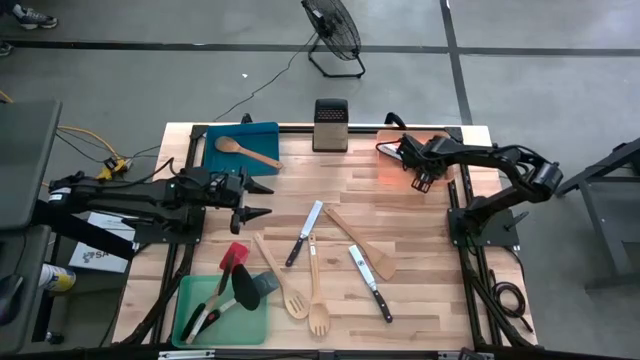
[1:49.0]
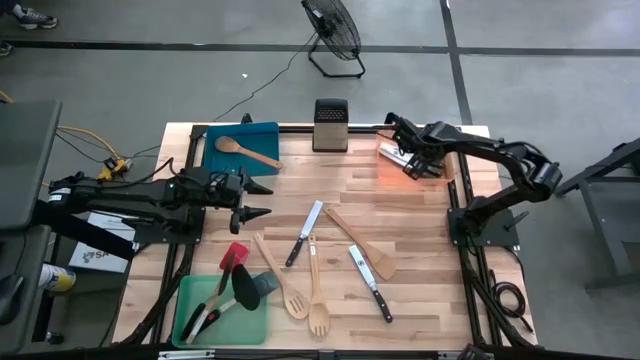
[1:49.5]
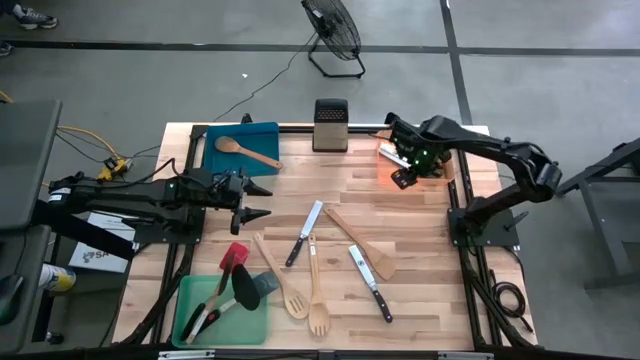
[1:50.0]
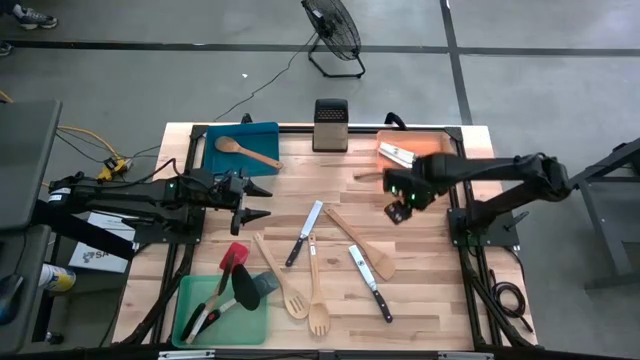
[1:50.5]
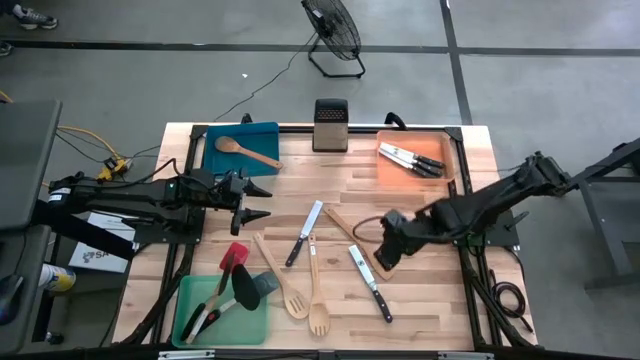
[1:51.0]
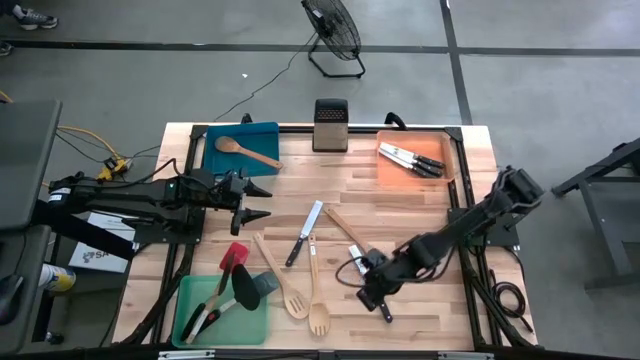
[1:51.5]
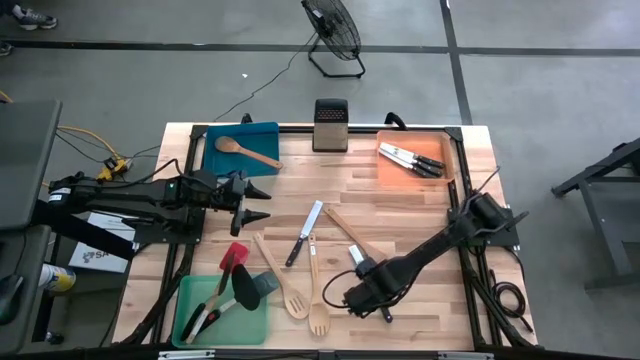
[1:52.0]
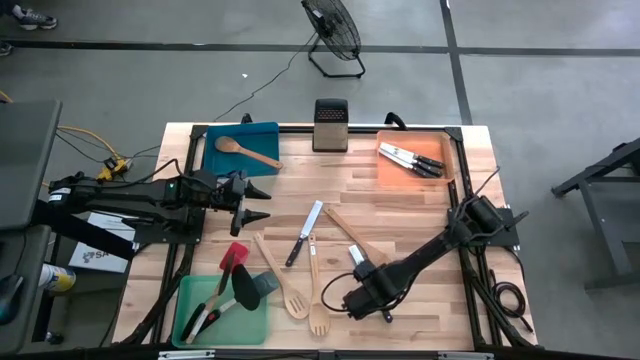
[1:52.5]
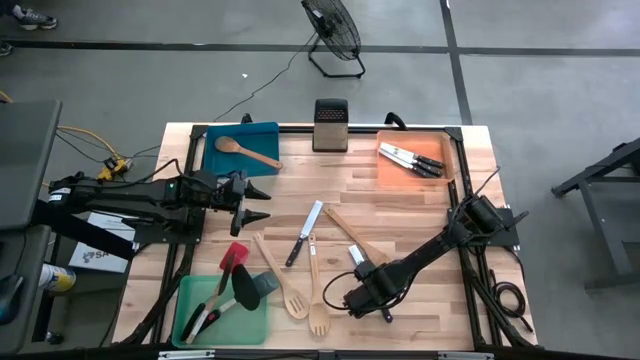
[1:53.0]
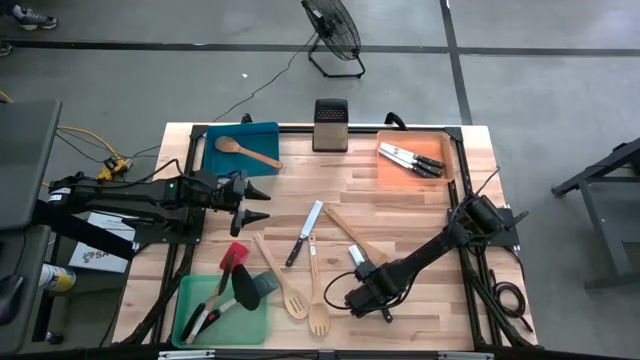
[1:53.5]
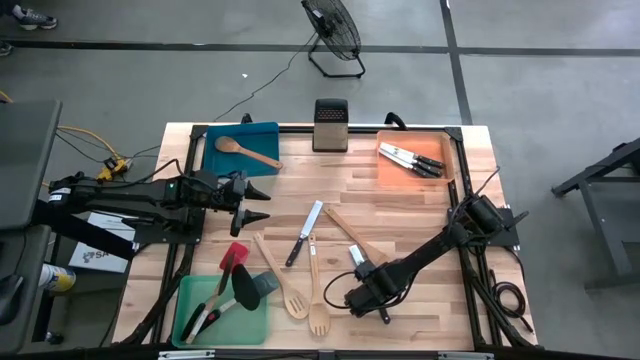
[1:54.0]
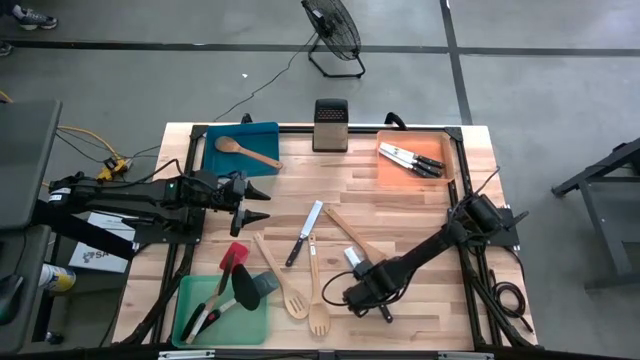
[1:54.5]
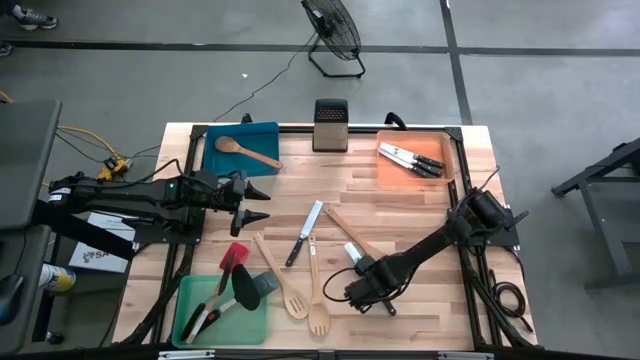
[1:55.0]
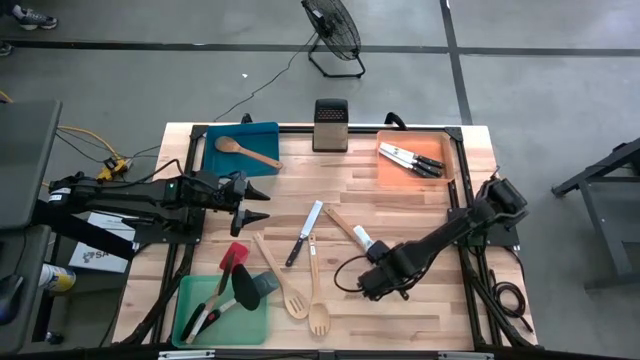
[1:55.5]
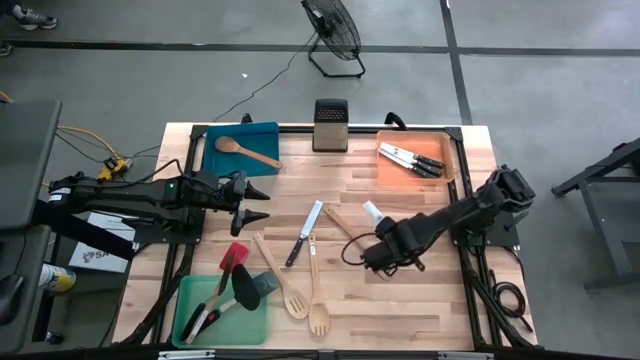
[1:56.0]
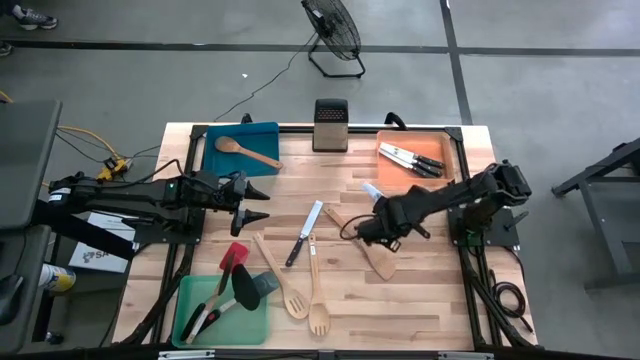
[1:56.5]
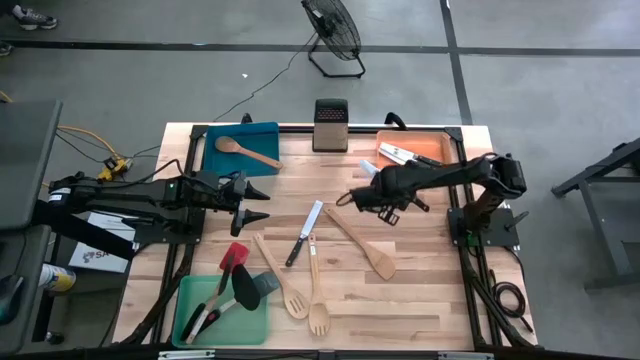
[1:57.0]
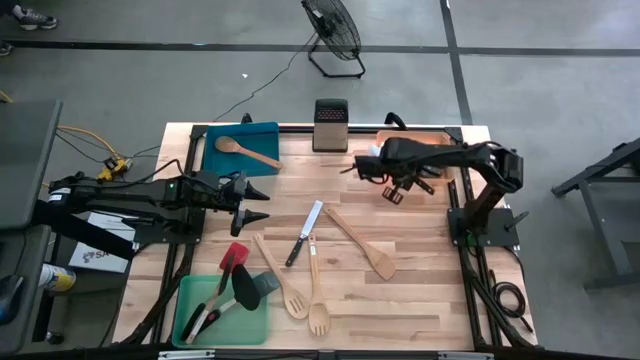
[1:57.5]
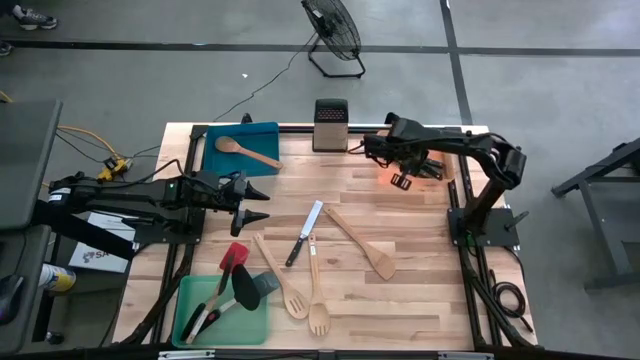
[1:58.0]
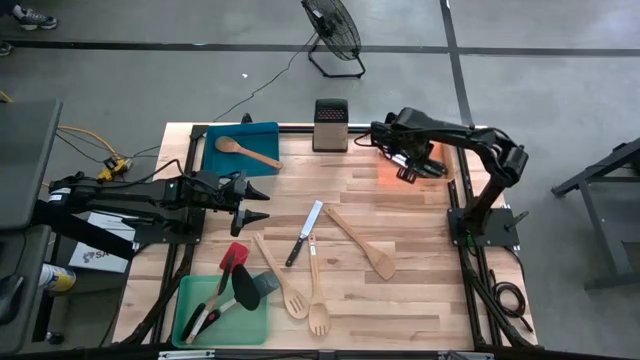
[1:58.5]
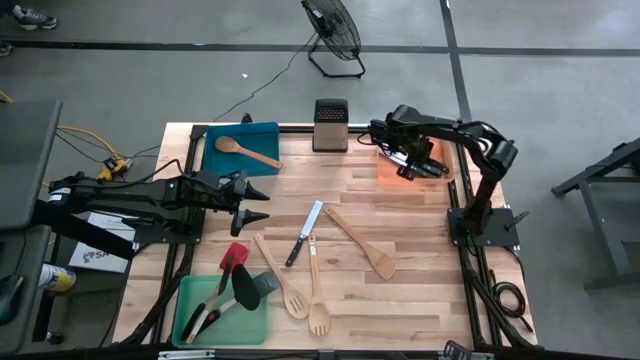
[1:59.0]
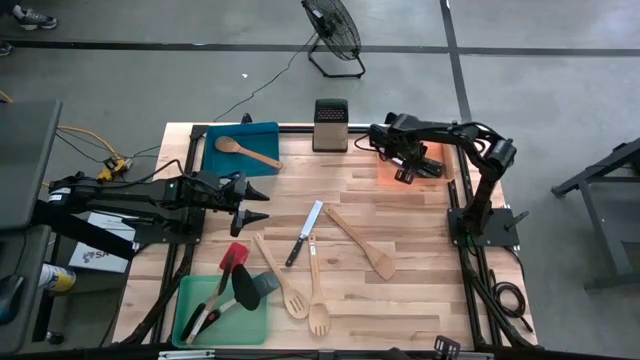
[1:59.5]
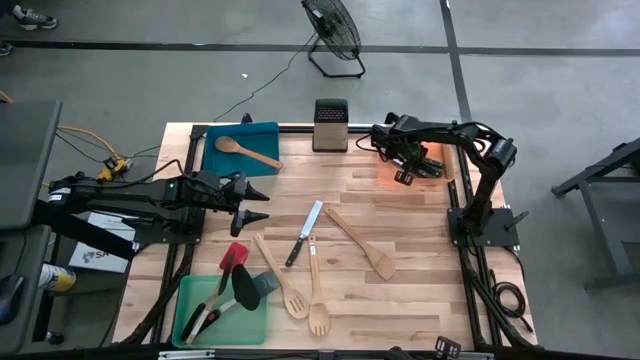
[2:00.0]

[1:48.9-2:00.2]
Task: Pick & Place Kitchen Items
Put the black spatula into the orange bin

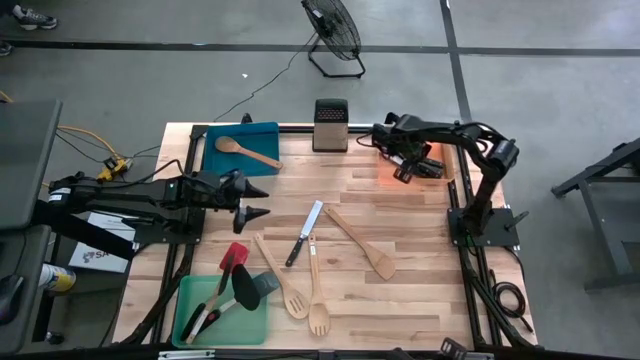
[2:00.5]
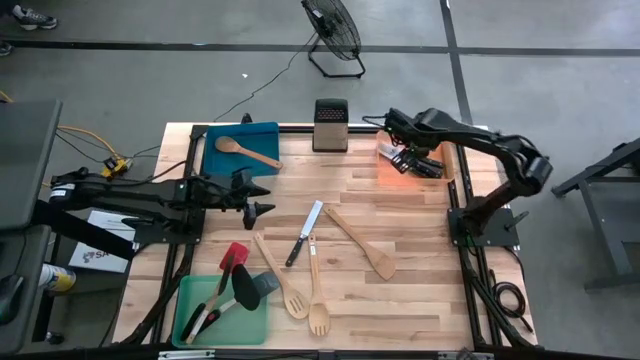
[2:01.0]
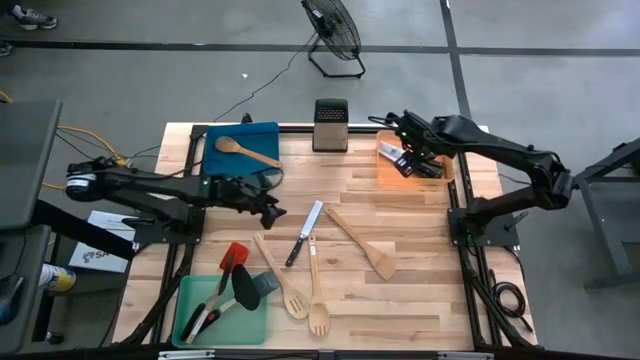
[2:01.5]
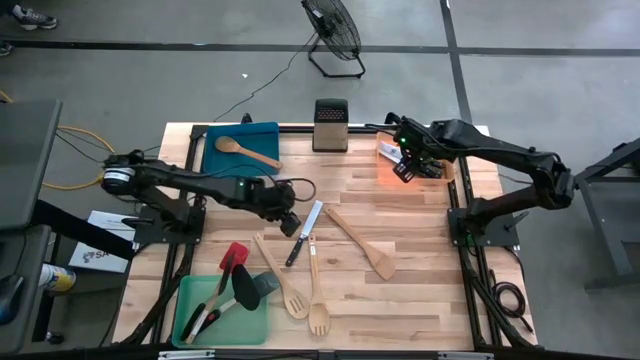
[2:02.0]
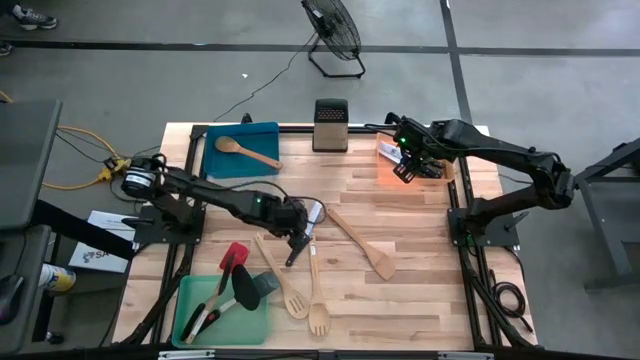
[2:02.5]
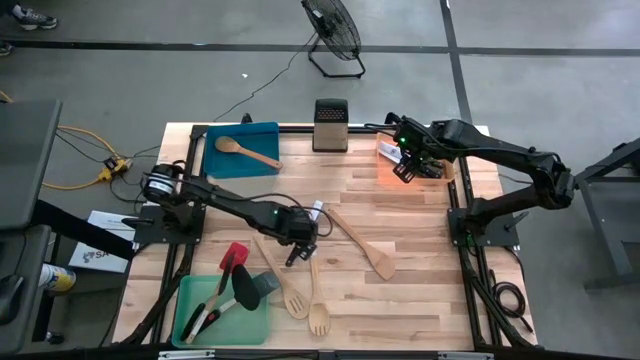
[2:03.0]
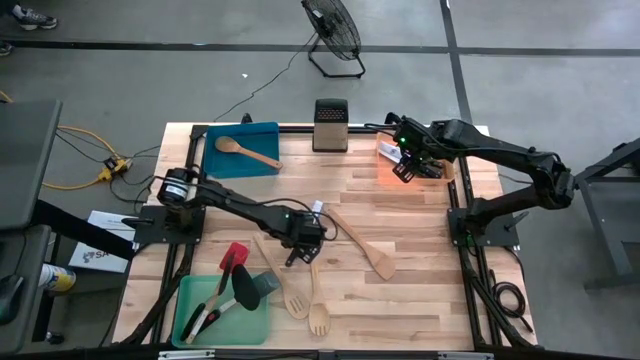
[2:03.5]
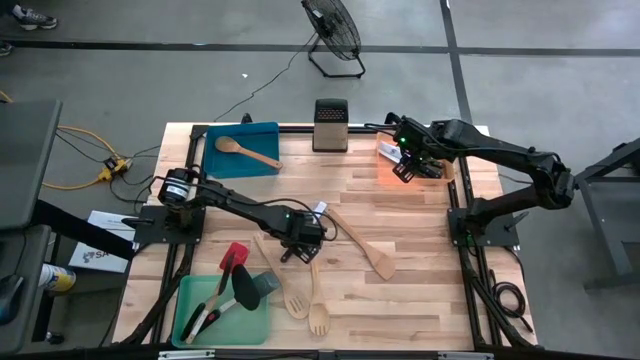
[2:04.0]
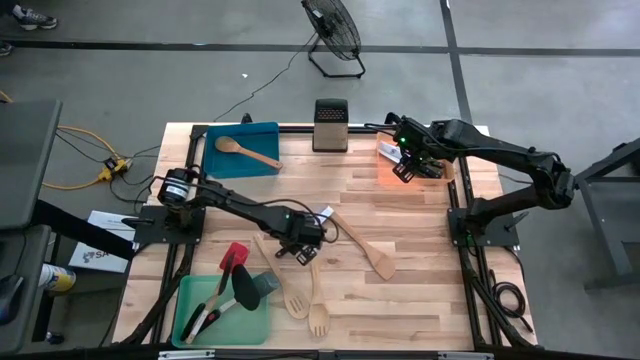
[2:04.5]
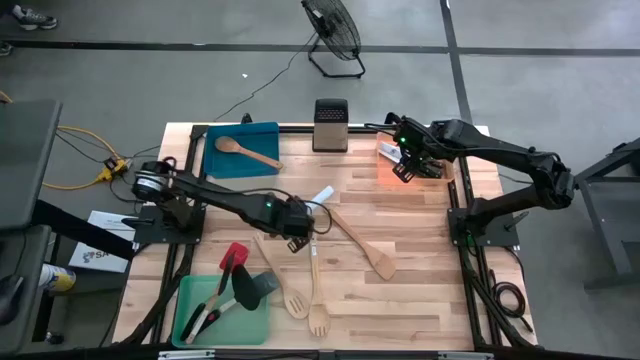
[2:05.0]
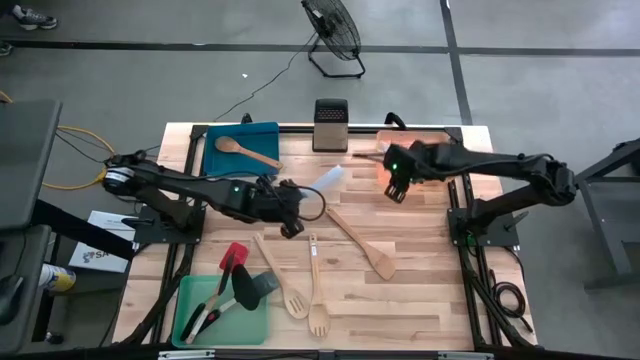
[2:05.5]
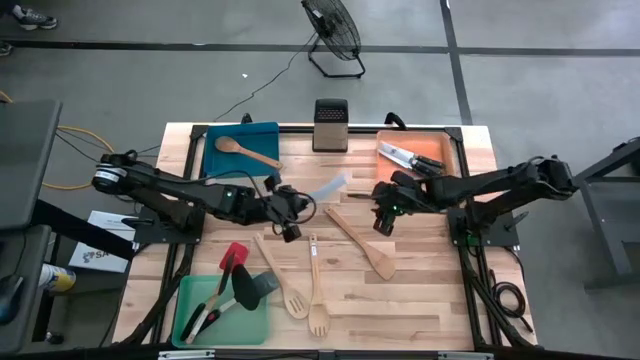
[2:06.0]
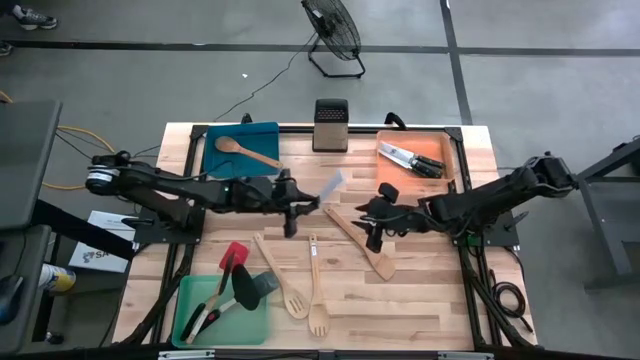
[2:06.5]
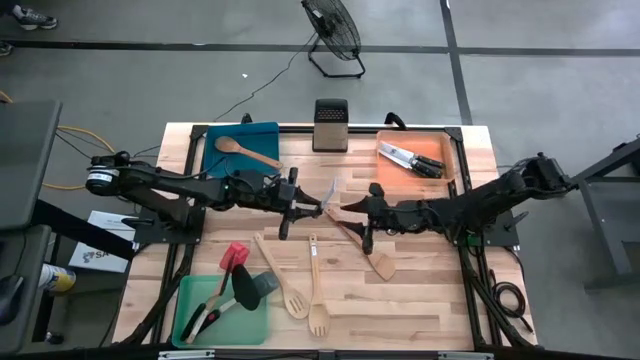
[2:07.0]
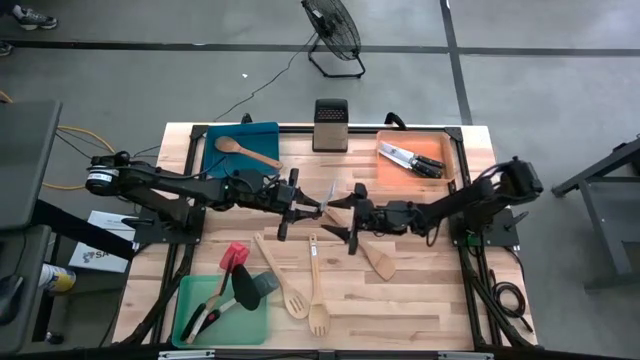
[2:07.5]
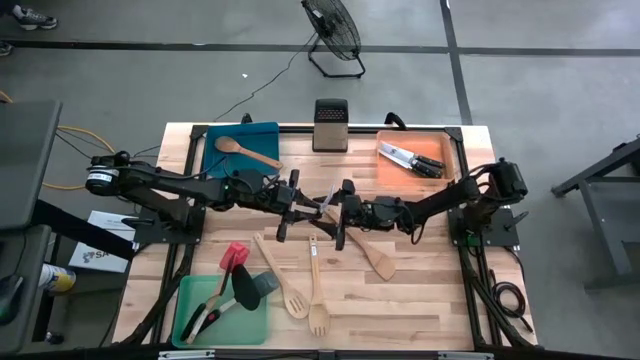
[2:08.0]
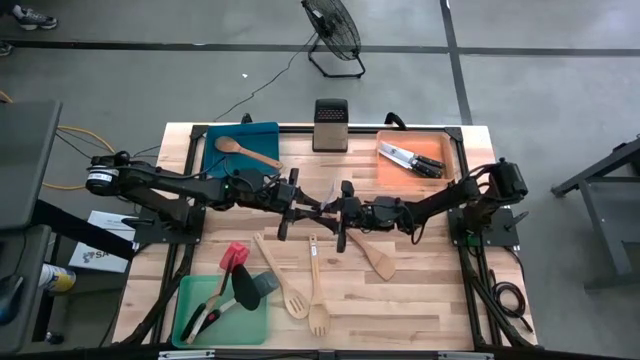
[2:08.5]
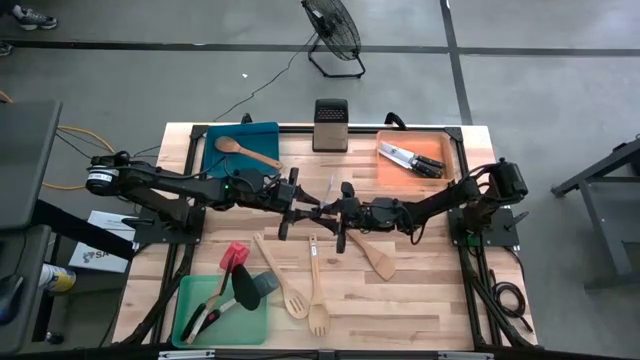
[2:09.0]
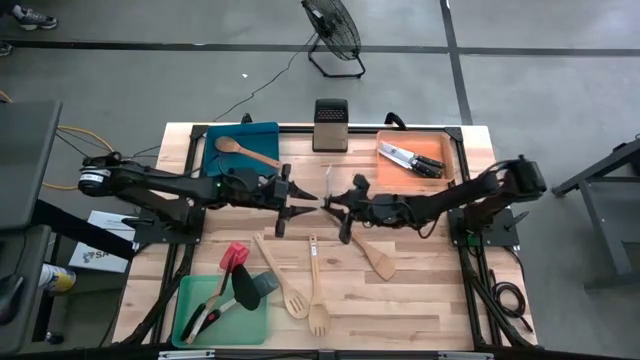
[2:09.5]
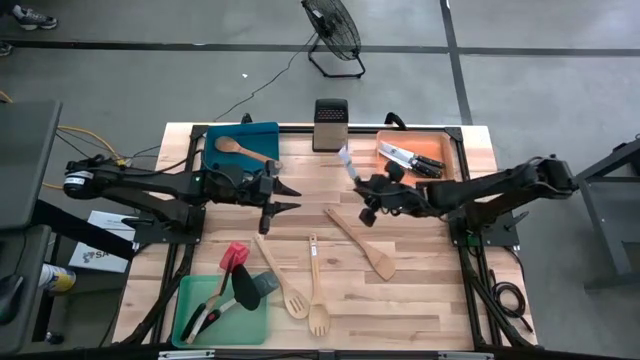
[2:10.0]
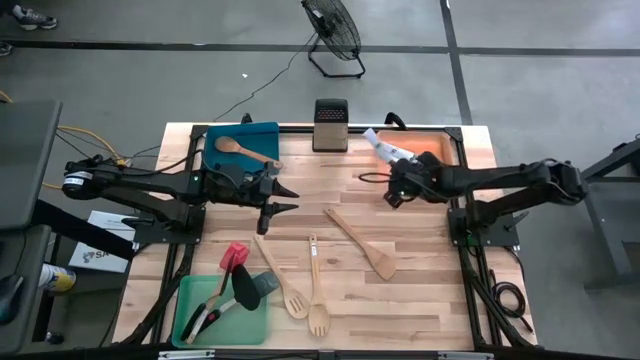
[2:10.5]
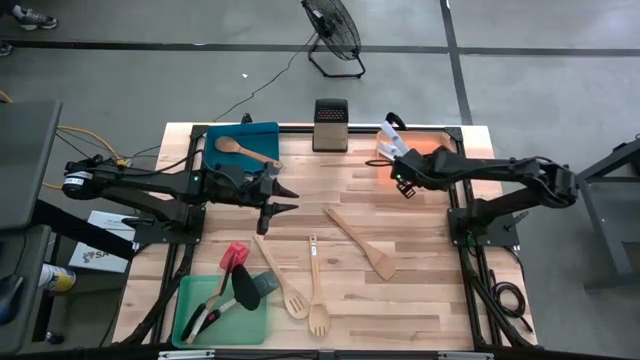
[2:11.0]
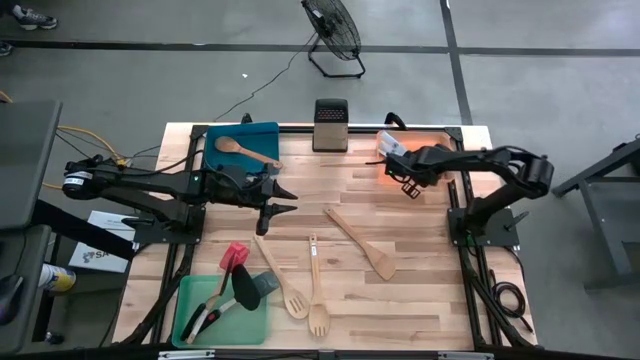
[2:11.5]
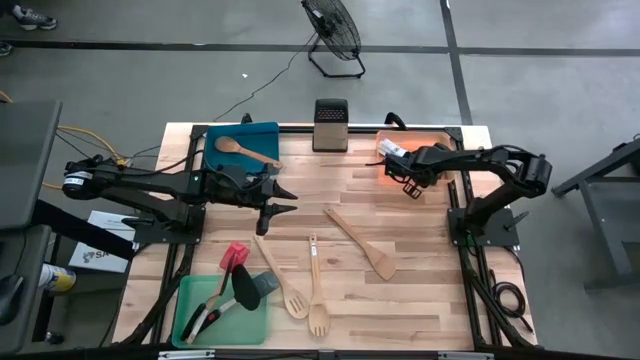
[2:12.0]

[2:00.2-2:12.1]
Put the black spatula into the orange bin
